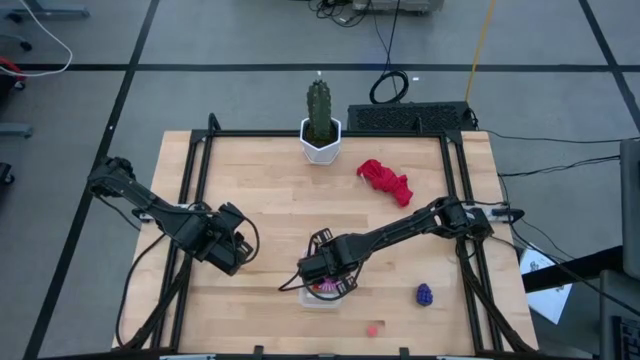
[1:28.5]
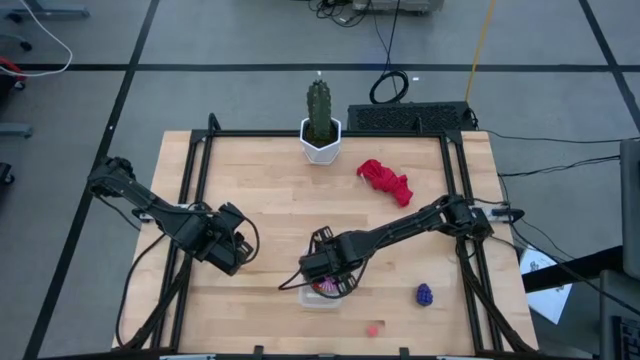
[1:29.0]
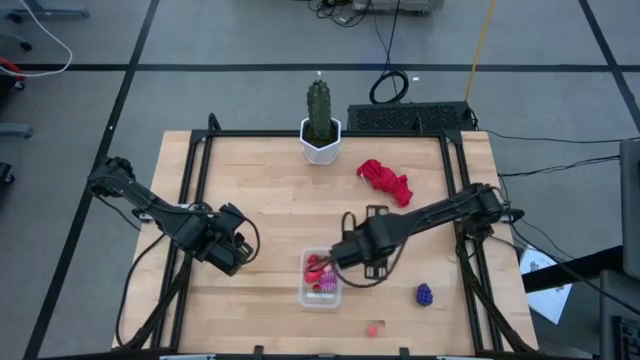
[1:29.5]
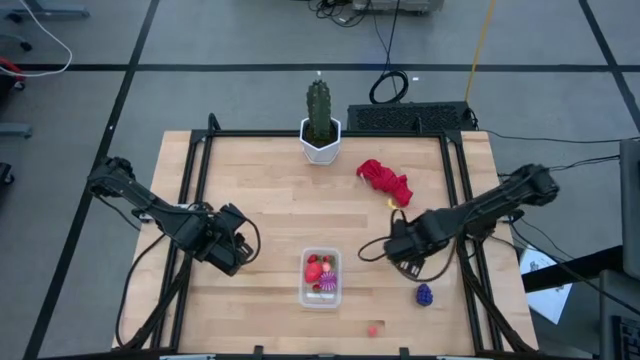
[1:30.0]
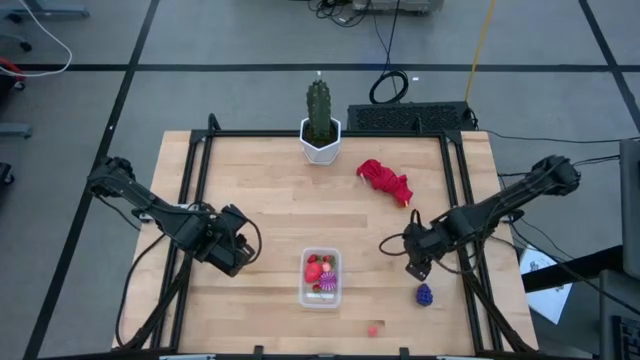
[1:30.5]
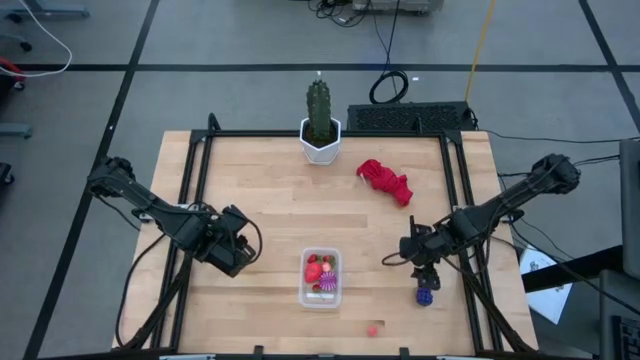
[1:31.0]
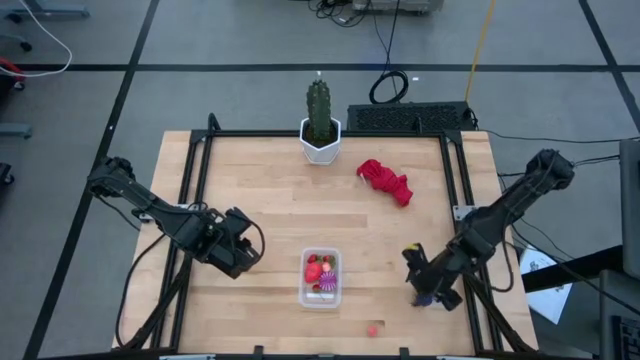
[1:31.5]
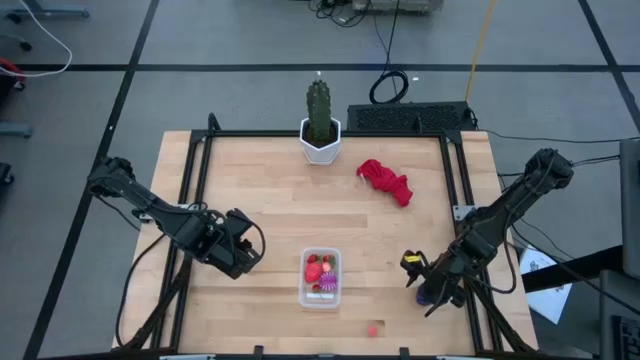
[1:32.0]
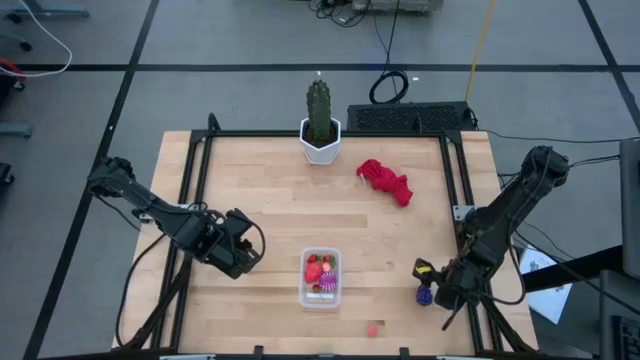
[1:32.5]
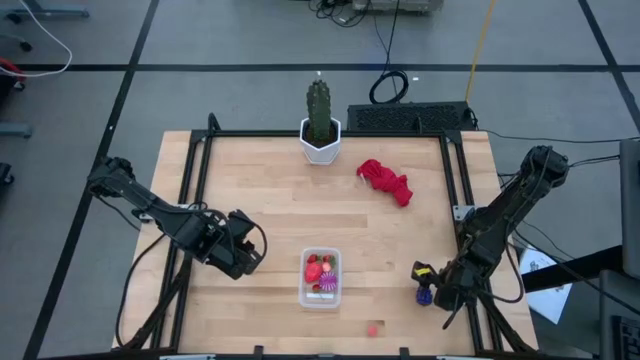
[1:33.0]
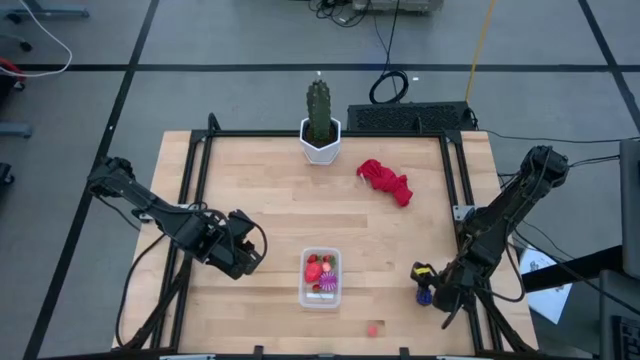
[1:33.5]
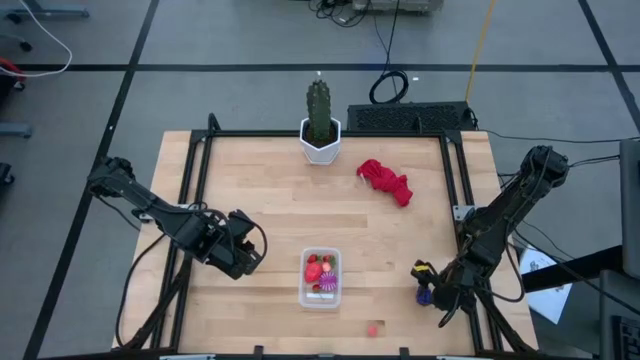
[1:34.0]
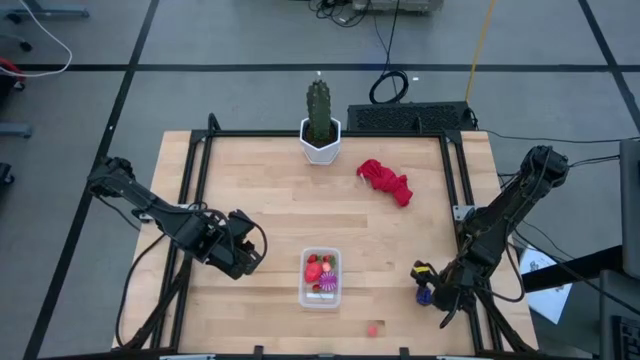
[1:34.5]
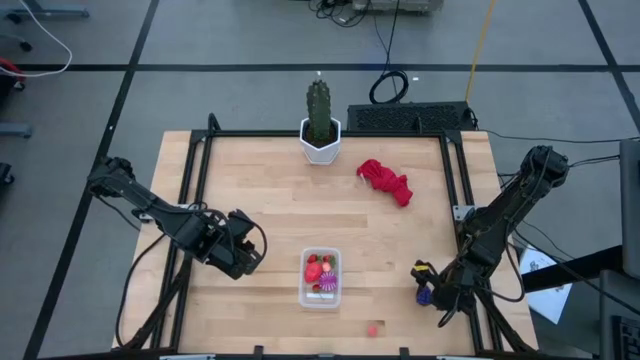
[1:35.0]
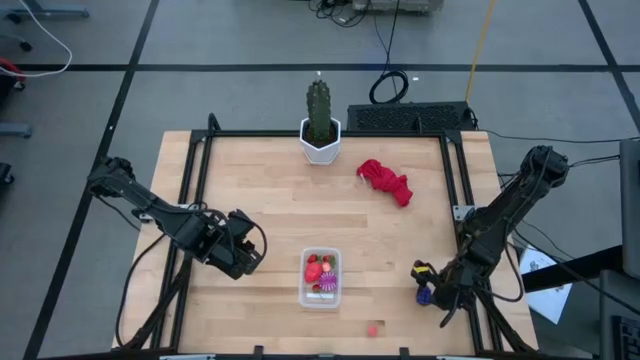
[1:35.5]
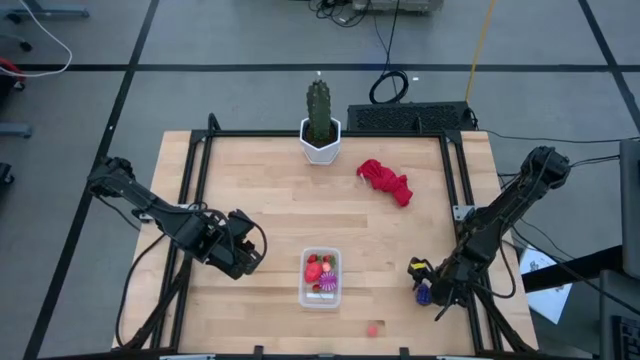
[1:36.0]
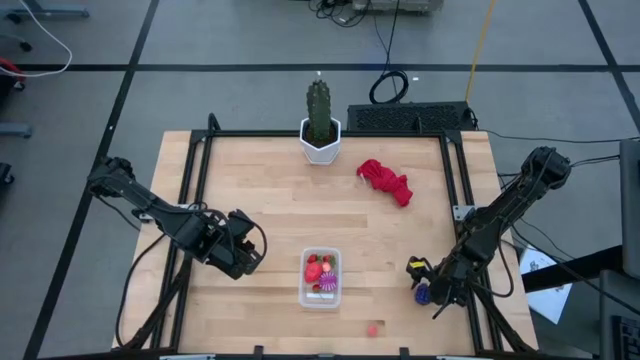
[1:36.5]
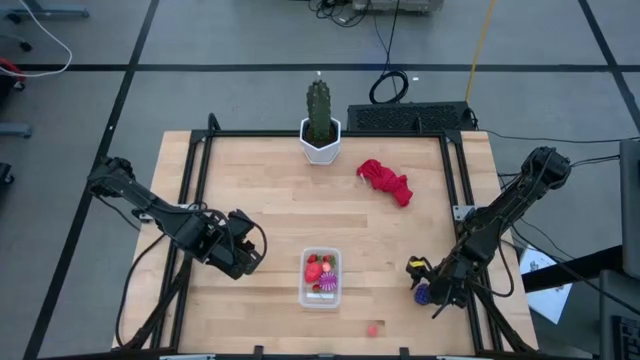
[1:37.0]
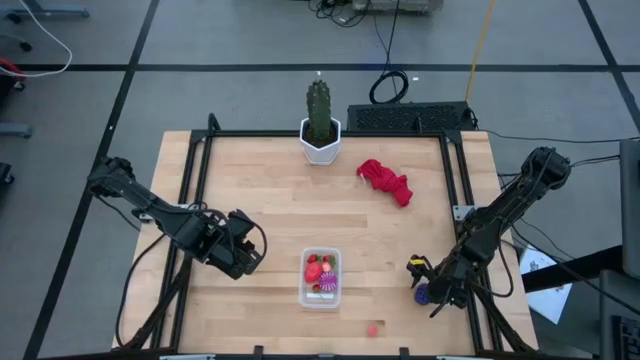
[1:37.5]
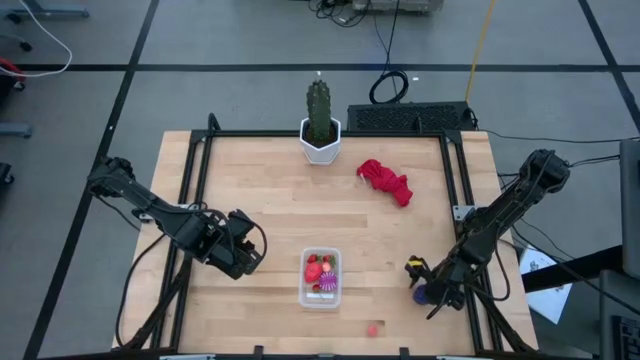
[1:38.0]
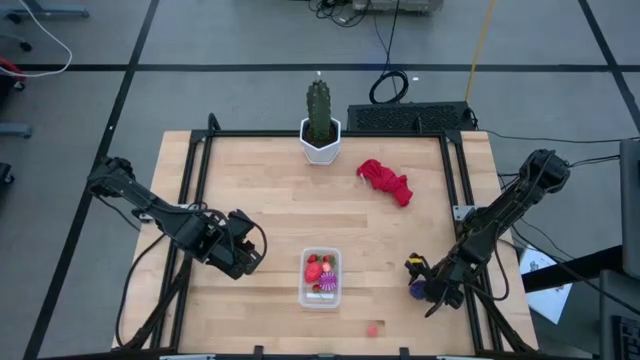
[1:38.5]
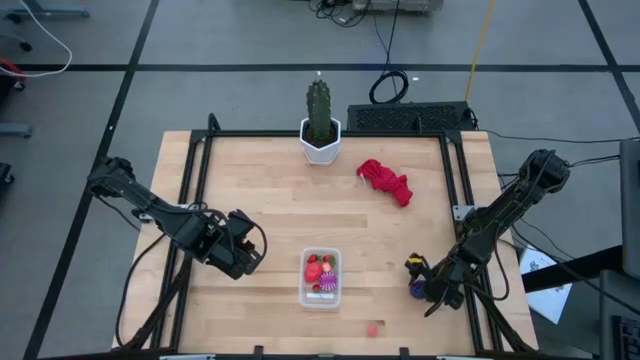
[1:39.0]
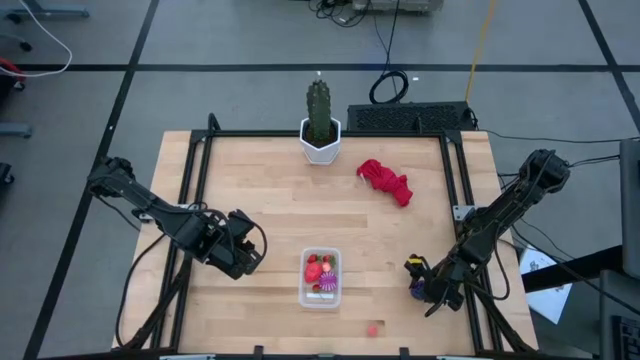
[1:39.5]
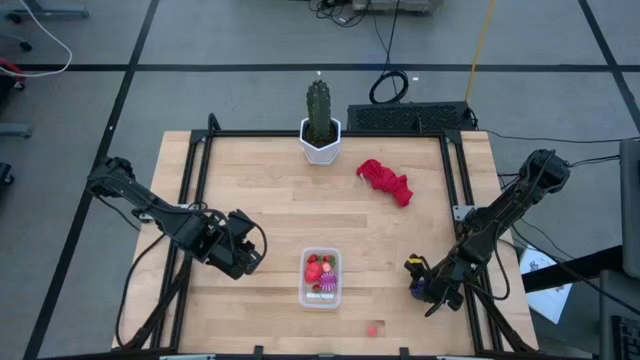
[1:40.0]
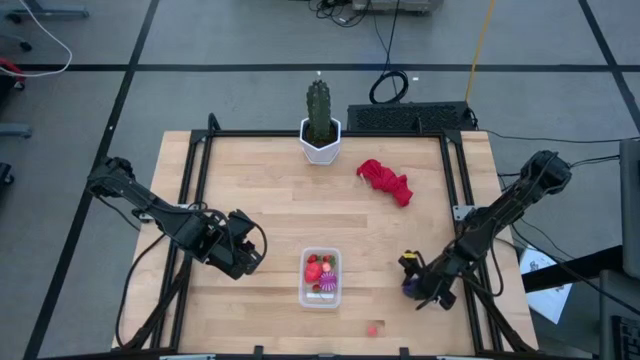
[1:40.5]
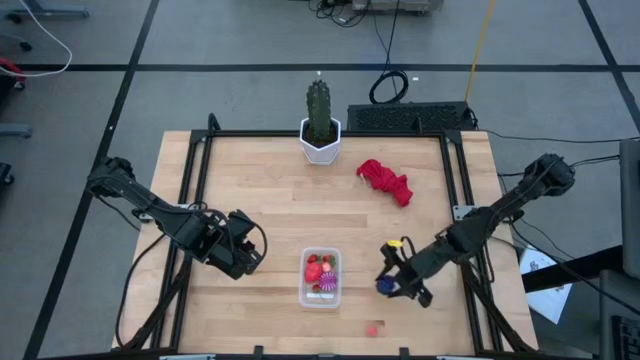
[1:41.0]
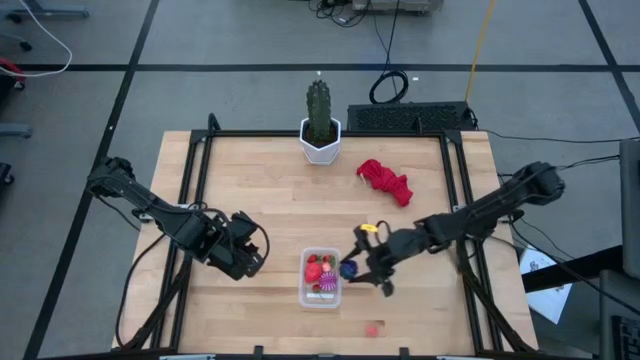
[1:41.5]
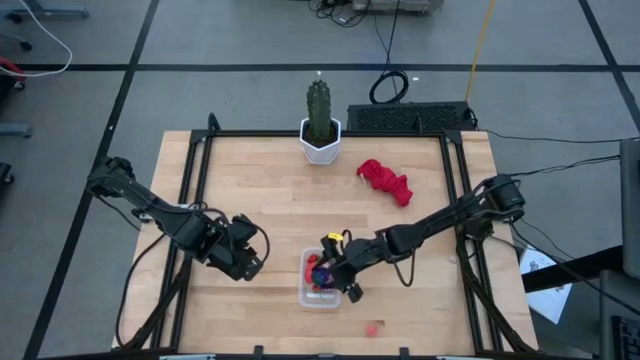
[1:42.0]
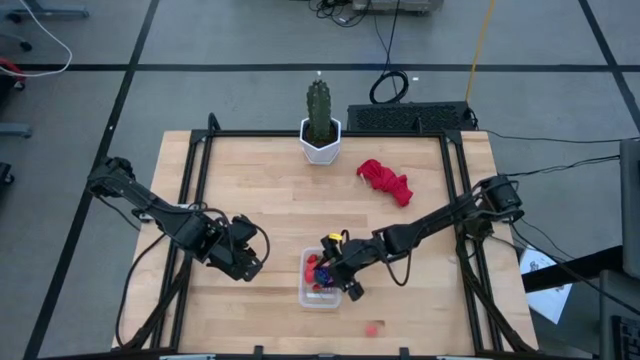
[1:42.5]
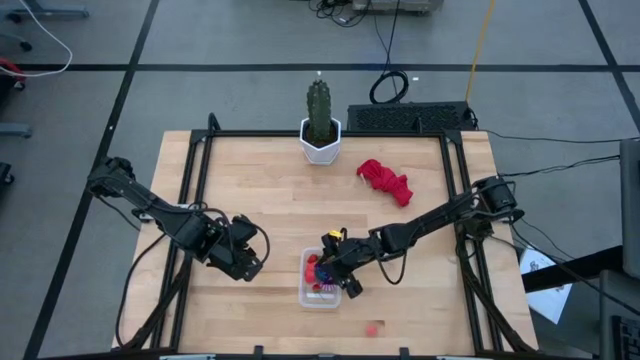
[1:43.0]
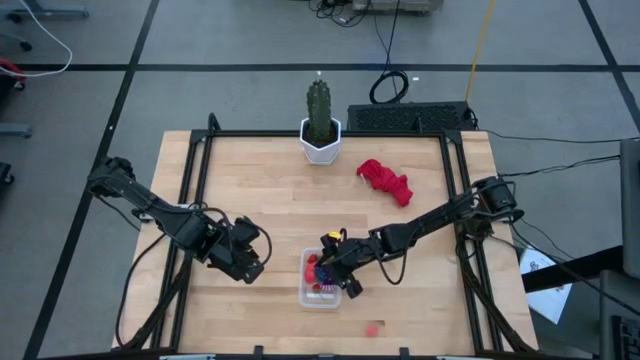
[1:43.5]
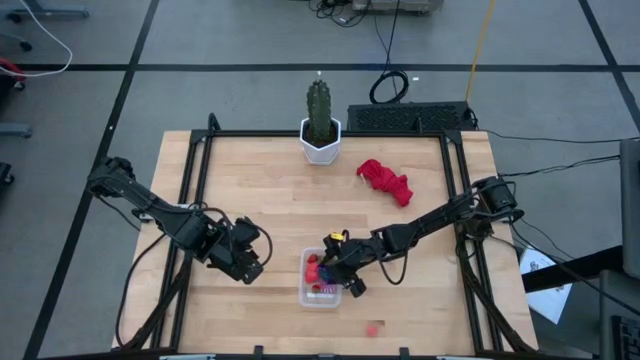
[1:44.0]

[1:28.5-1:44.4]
Task: Pick and placing Produce into tupperware
Put the grapes into the transparent container

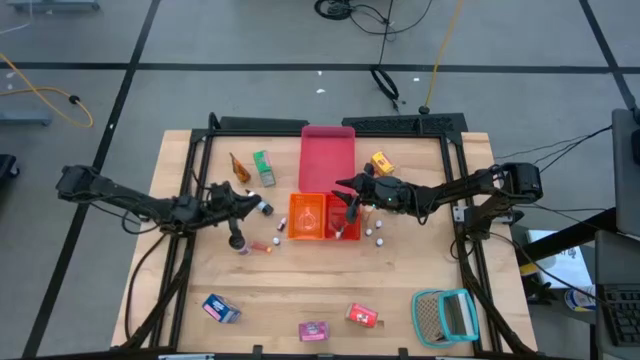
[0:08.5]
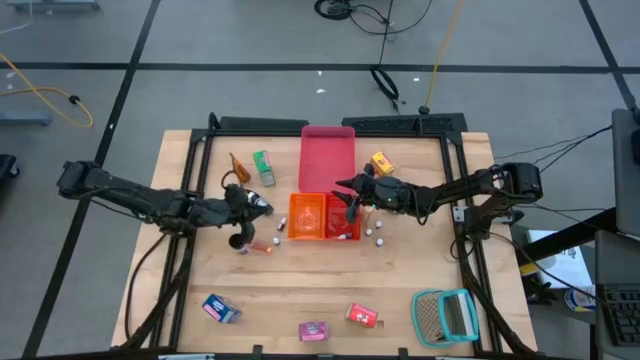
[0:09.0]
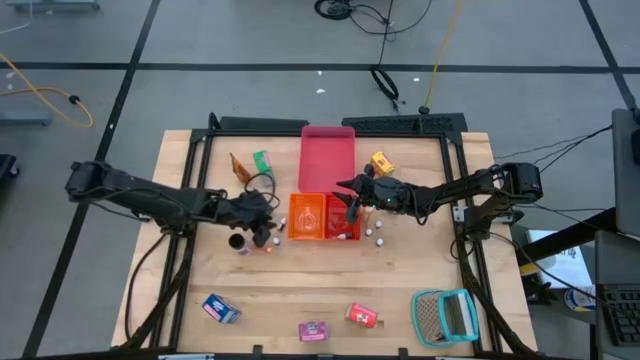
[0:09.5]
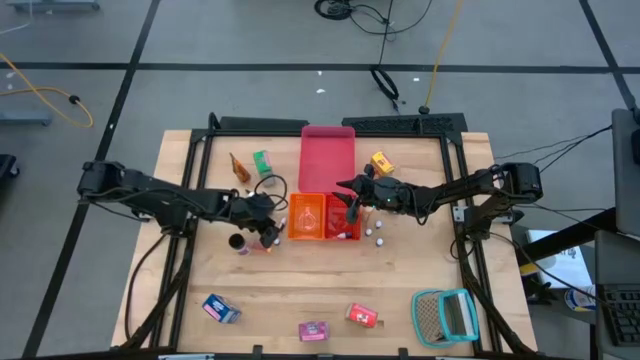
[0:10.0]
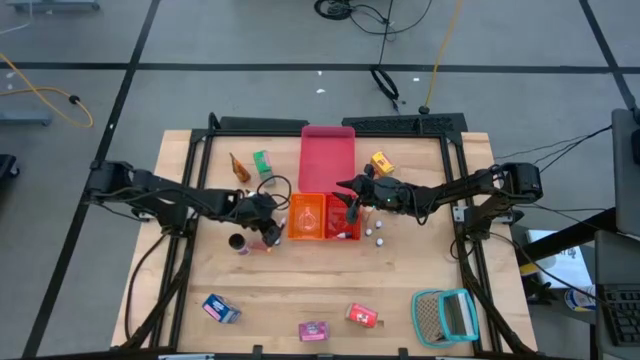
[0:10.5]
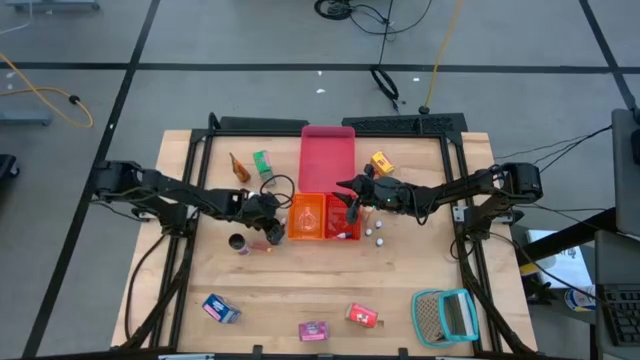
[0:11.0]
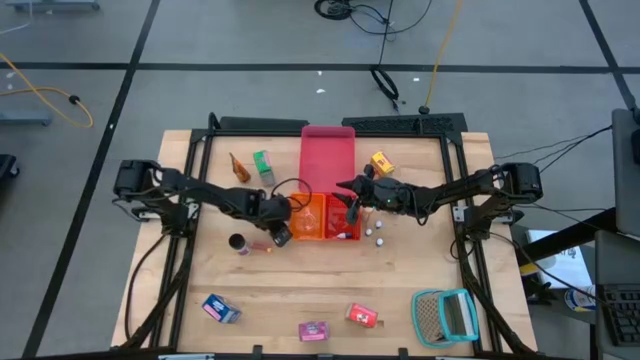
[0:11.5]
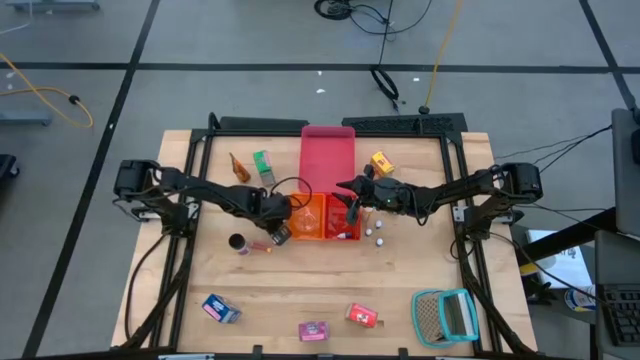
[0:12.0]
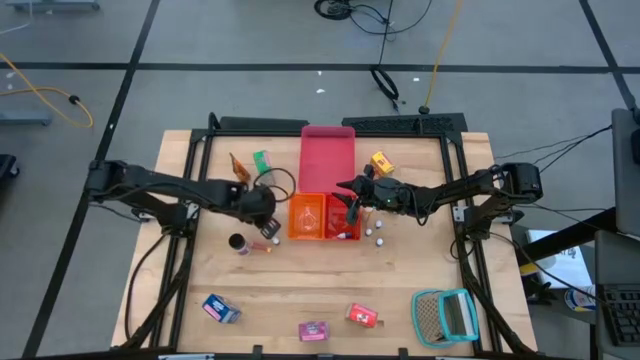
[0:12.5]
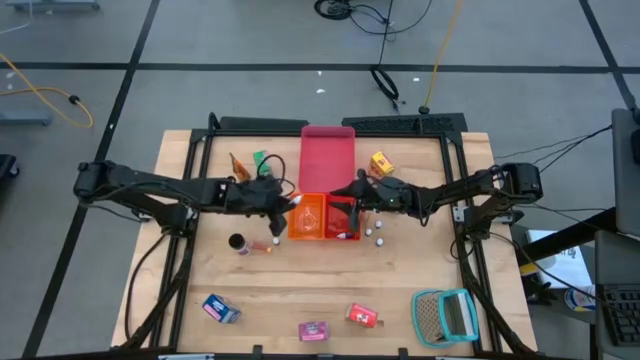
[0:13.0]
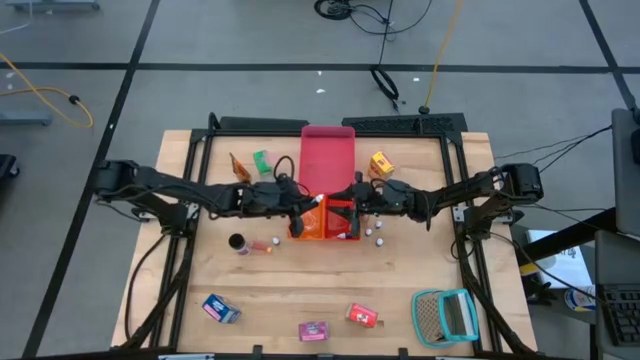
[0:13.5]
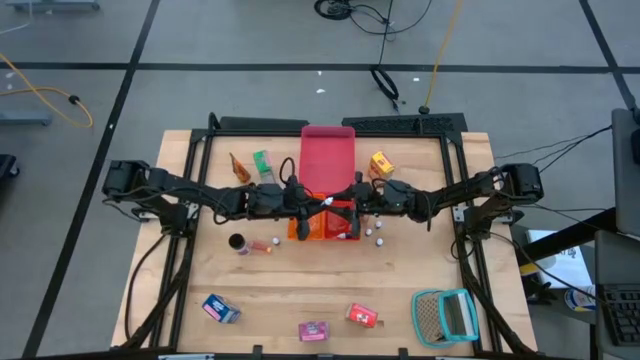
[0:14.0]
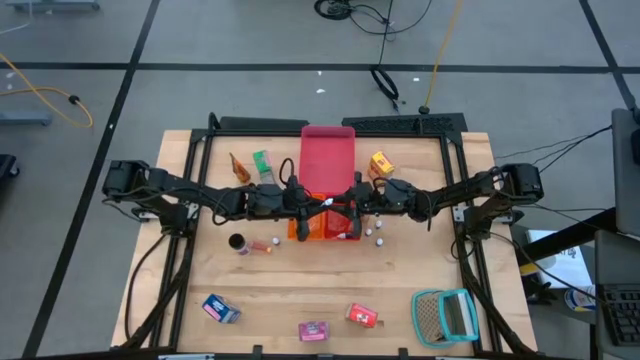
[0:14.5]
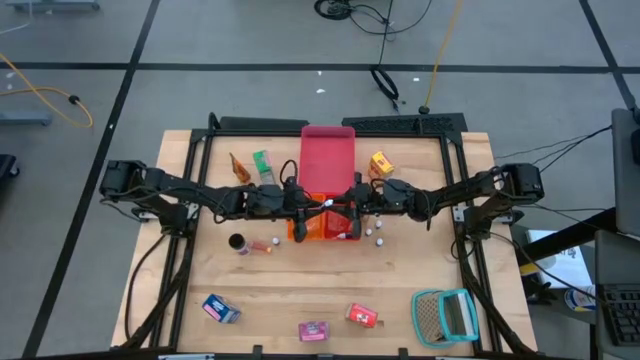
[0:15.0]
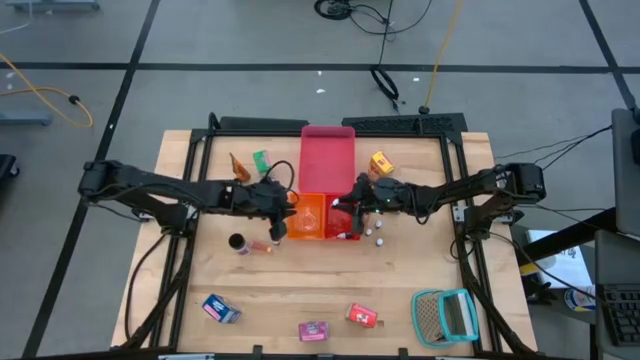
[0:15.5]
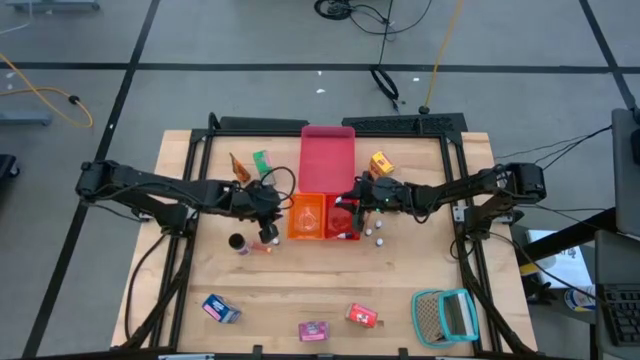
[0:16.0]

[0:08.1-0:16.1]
Task: Pick & Place Kitchen Items
Put the small orange food coloring bottle into the red basket
